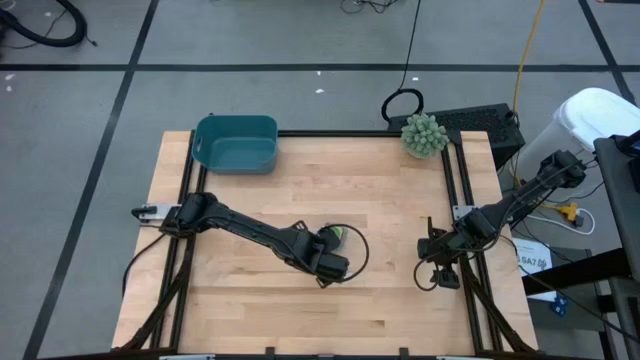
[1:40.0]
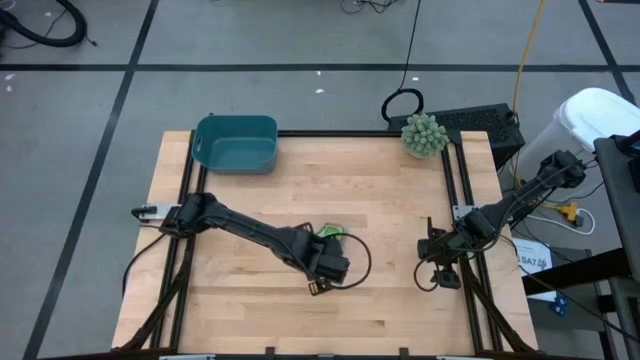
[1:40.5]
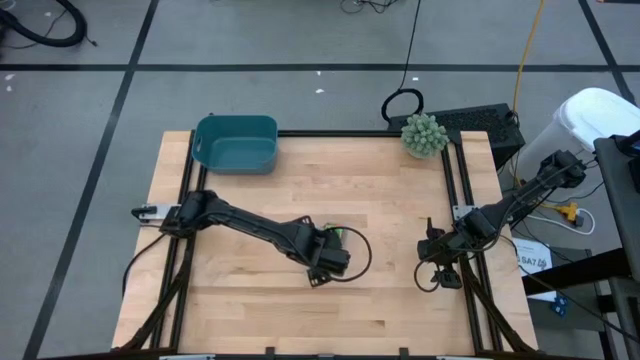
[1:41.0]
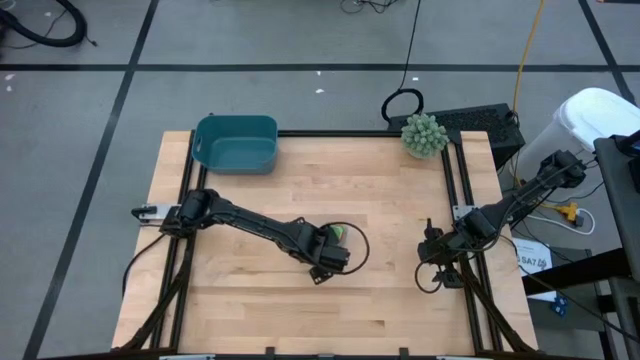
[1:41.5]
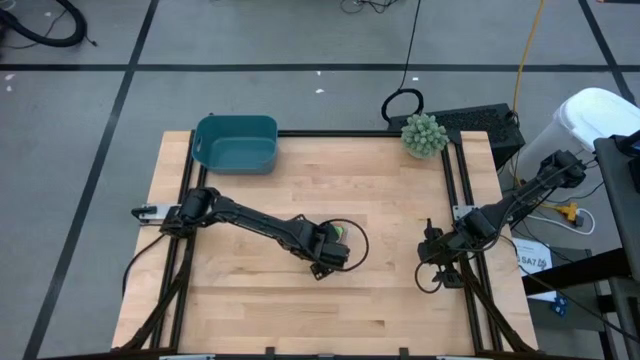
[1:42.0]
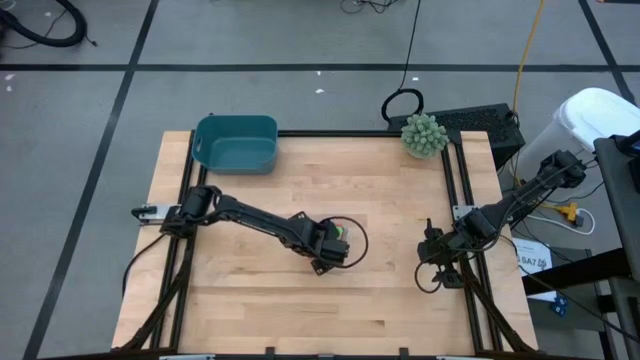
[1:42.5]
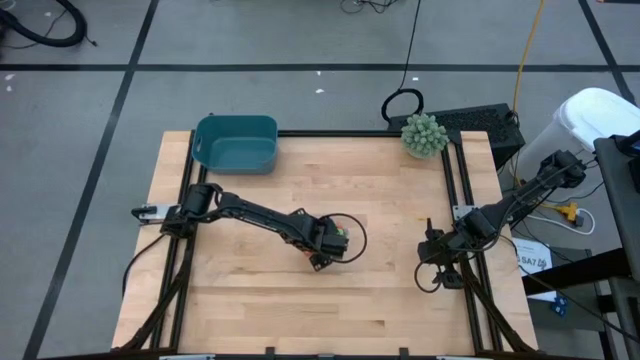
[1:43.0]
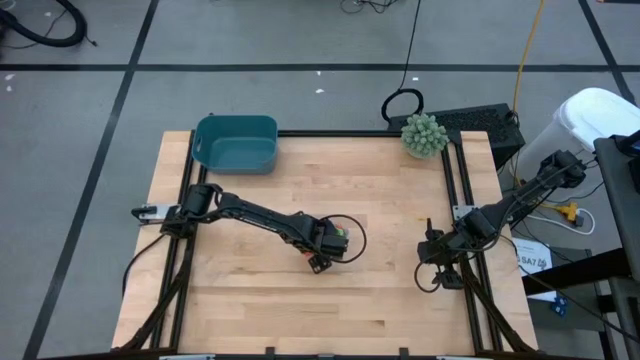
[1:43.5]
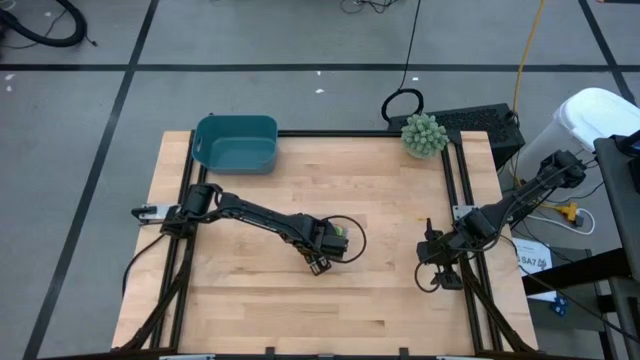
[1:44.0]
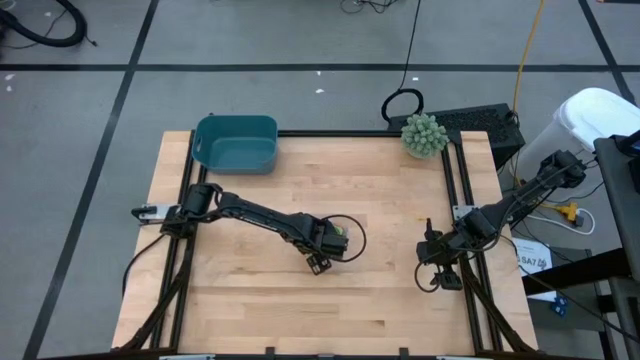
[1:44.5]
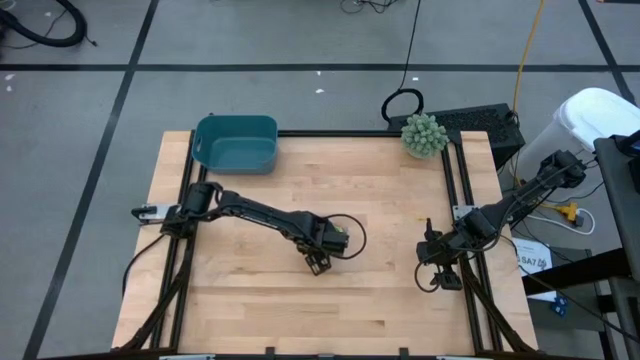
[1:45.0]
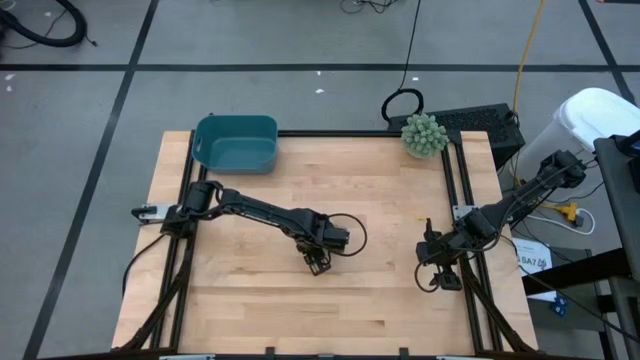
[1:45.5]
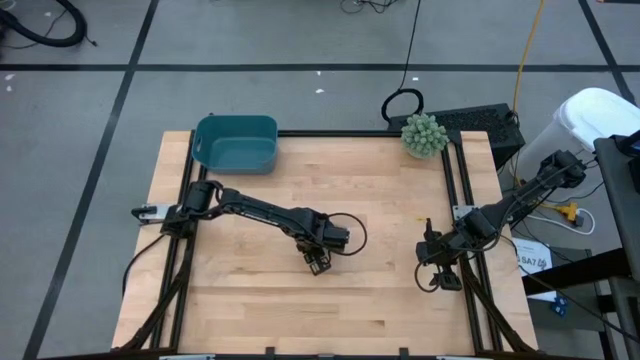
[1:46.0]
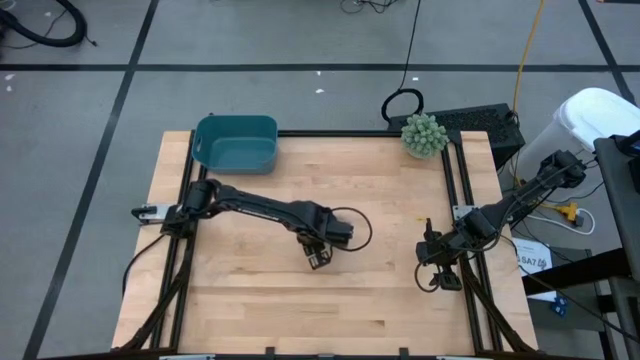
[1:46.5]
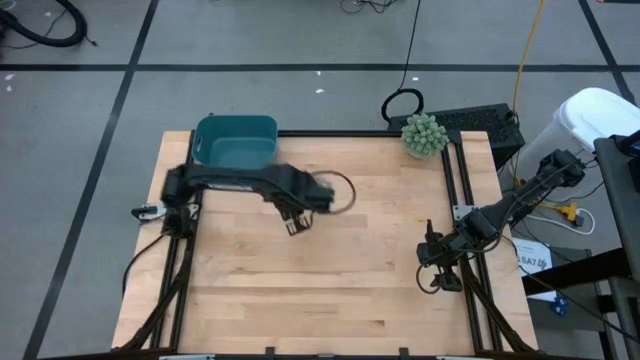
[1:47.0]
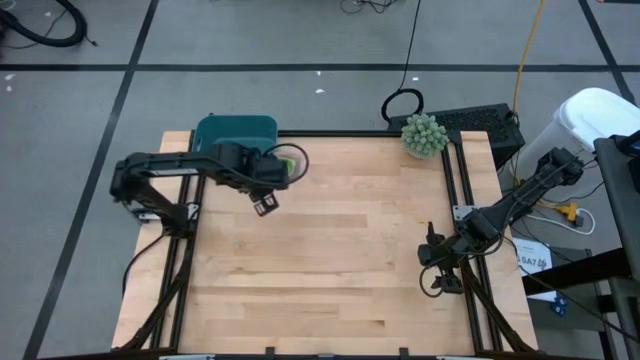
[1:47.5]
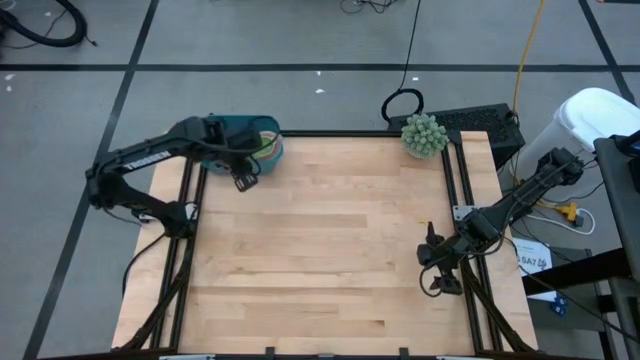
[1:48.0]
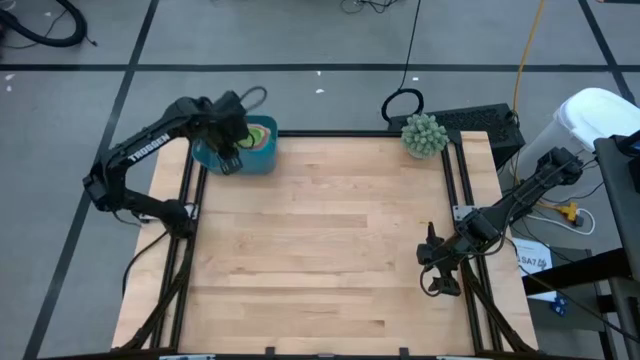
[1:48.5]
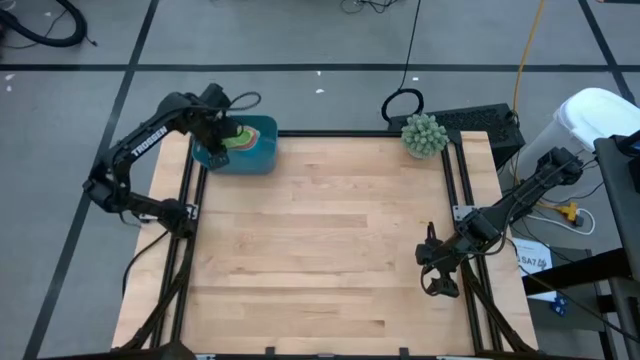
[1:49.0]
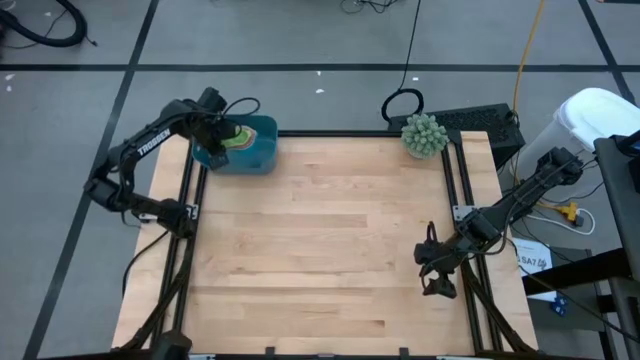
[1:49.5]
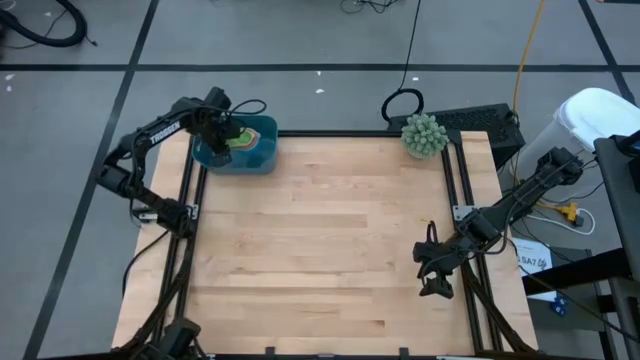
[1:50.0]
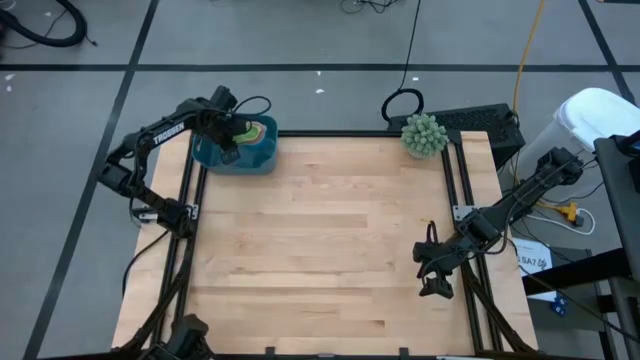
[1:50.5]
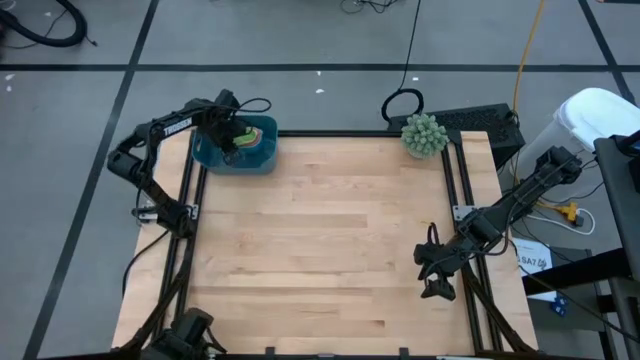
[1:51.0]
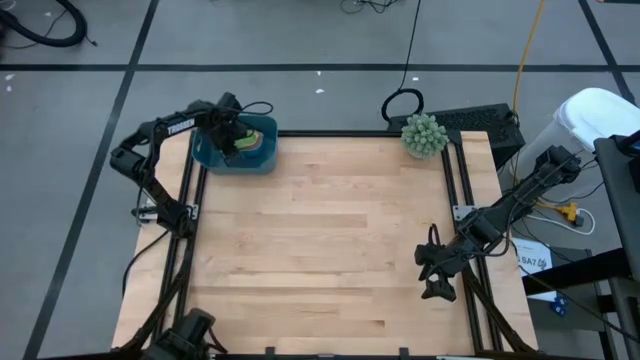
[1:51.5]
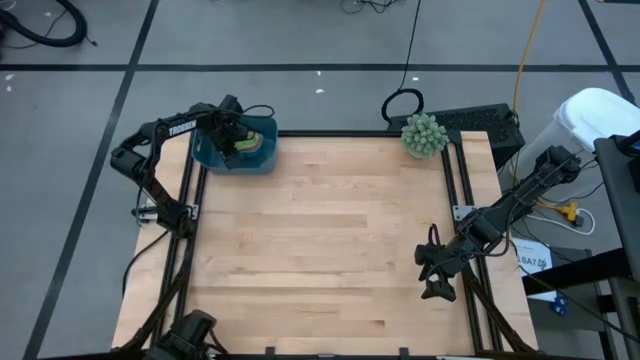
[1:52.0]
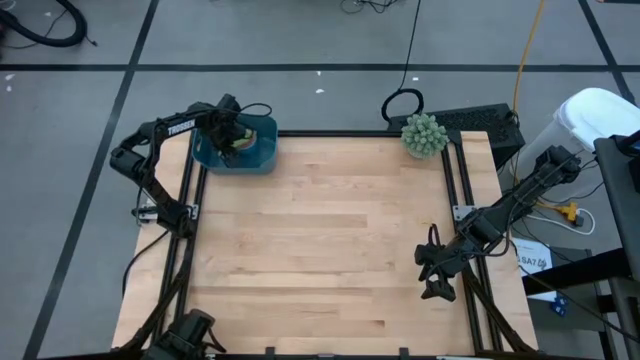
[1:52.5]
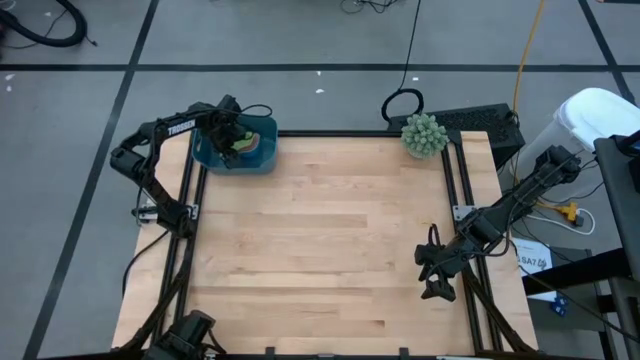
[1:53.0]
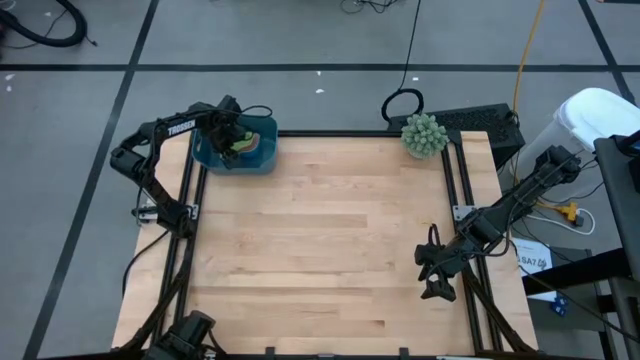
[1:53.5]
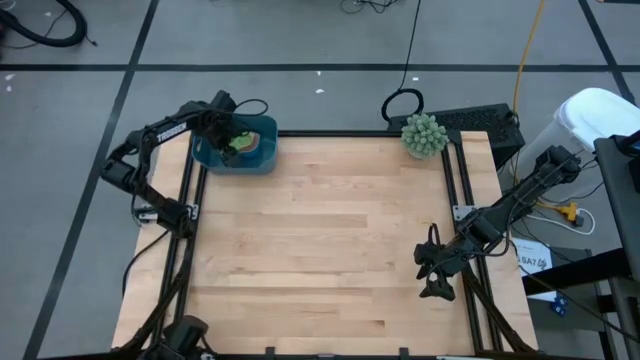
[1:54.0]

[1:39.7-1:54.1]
Task: Nest measuring cups in basket
Put the nested measuring cups into the blue bin

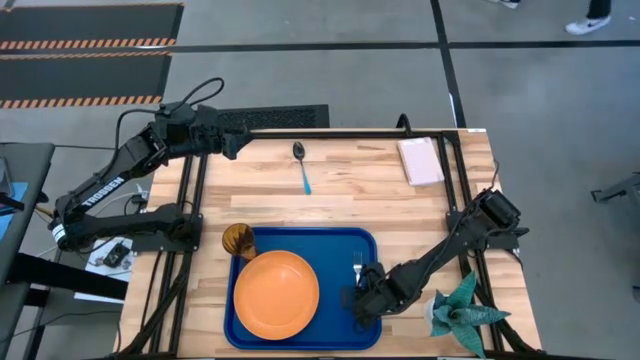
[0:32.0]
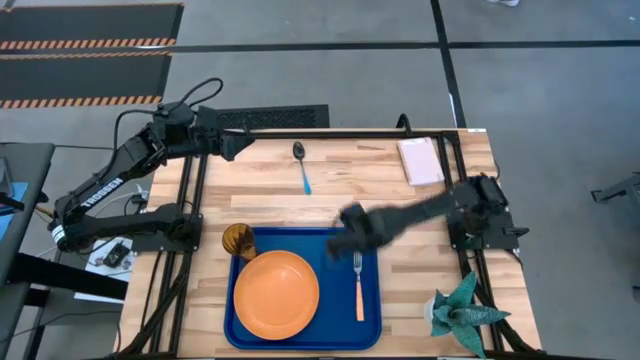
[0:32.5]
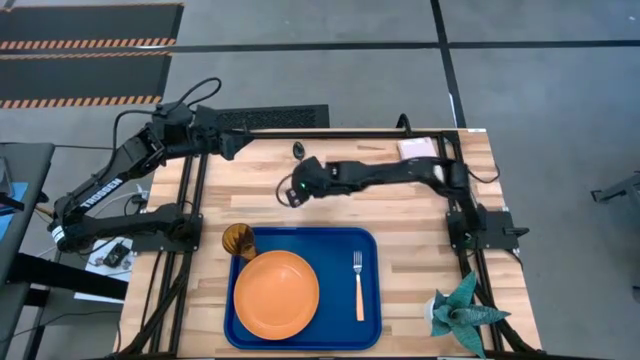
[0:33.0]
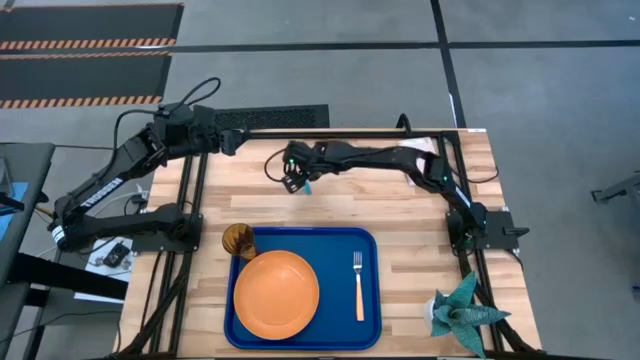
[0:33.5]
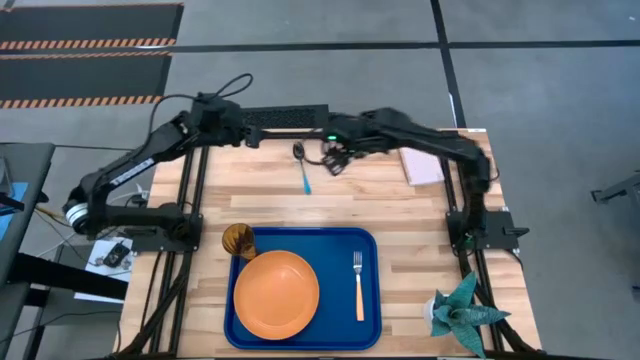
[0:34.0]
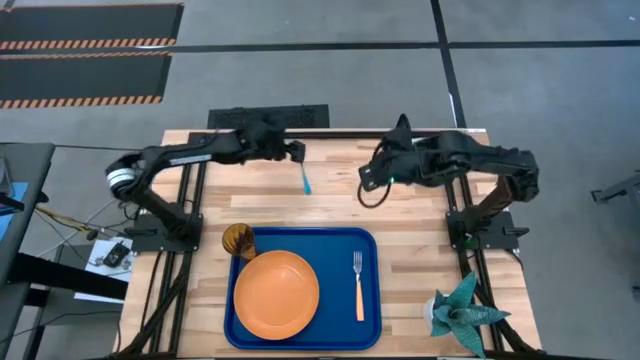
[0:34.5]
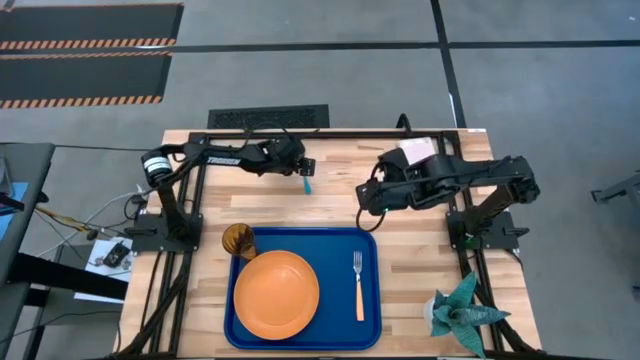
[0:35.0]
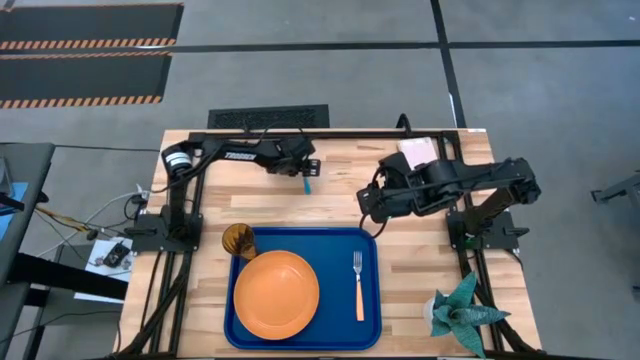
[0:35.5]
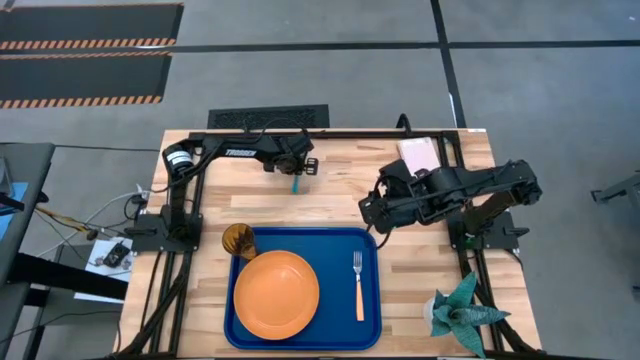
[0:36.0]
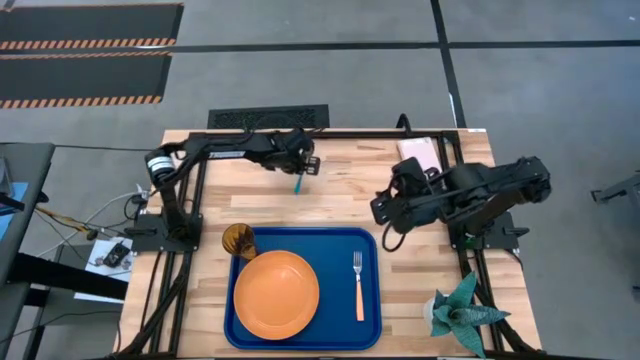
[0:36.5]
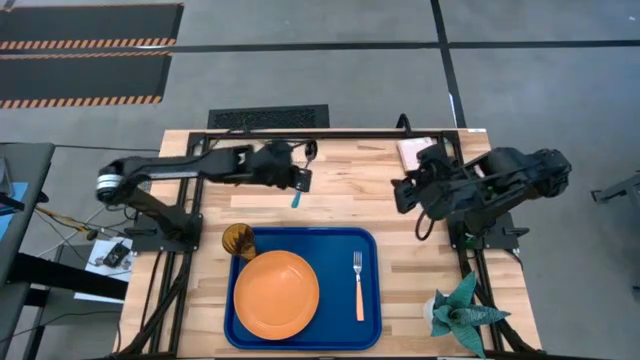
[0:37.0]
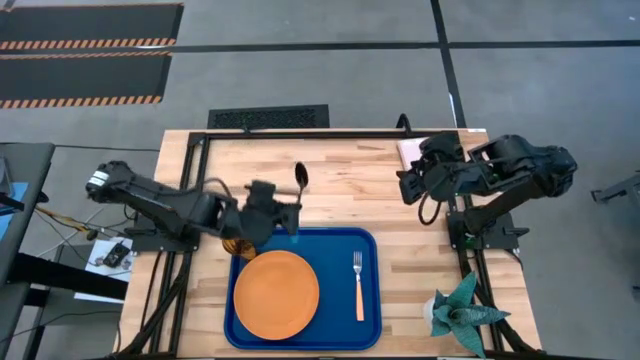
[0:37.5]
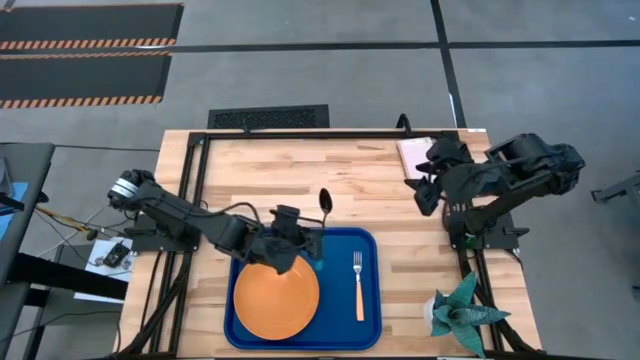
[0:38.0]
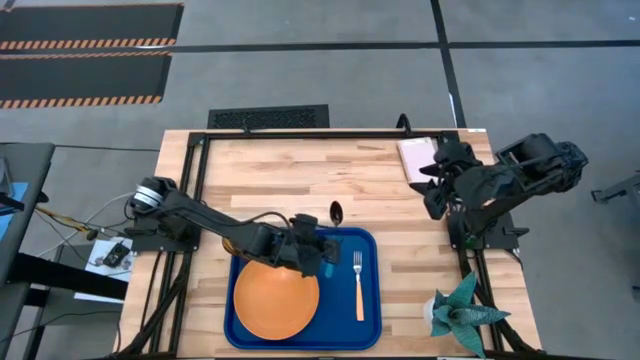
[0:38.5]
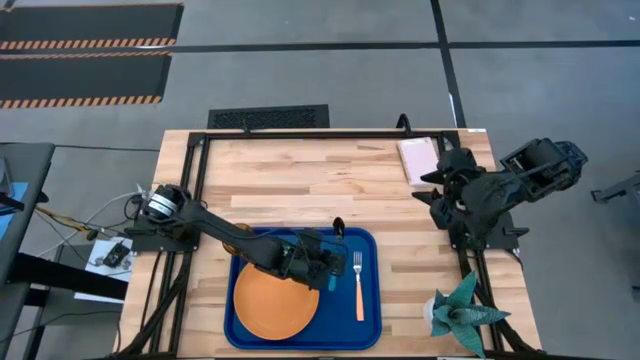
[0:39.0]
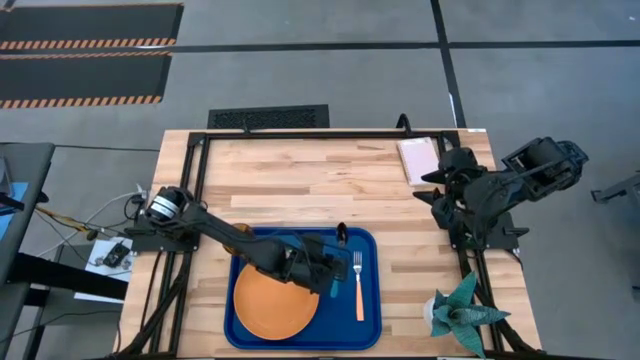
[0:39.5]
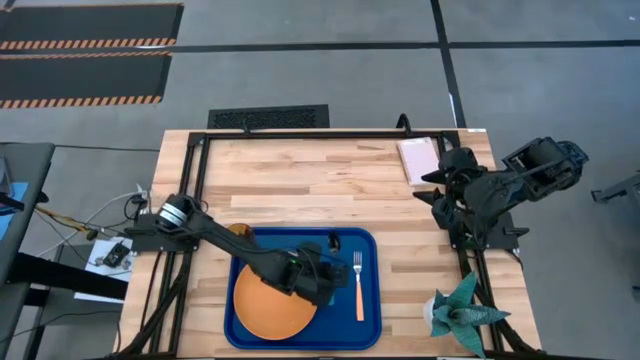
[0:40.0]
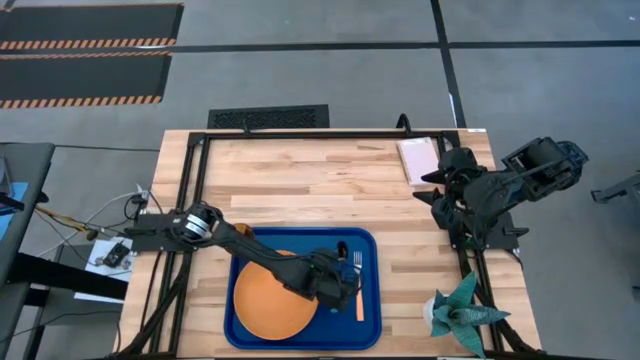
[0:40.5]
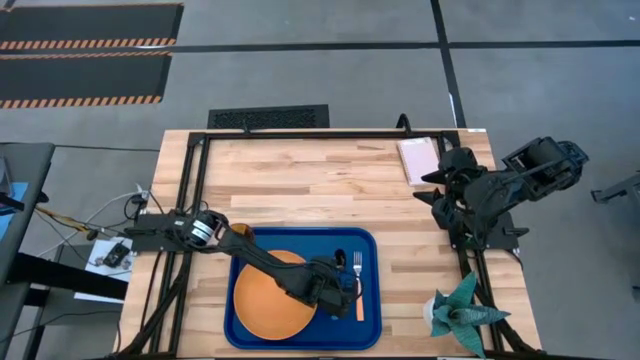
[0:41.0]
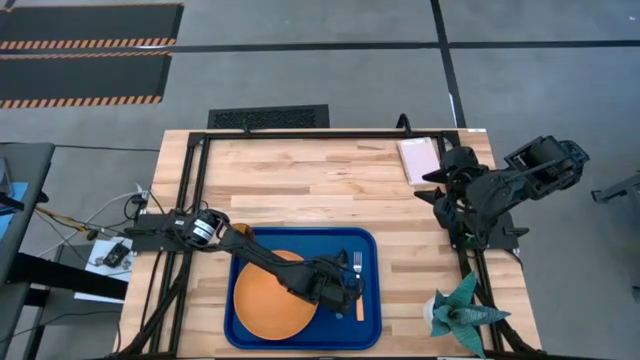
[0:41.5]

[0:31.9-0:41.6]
Task: Pick and place plate/cup/fork/spoon on tray
Put the blue spoon on the blue tray to the left of the orange fork
